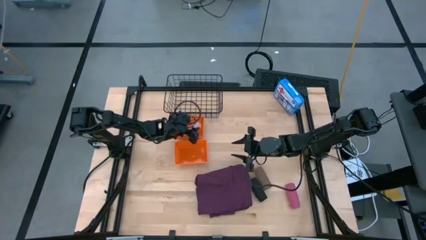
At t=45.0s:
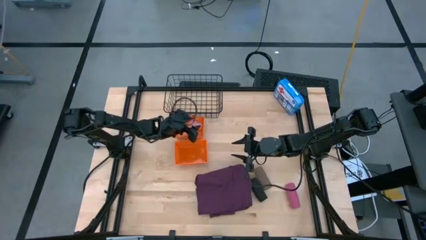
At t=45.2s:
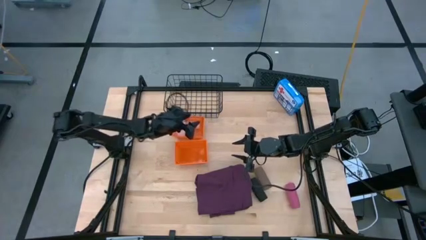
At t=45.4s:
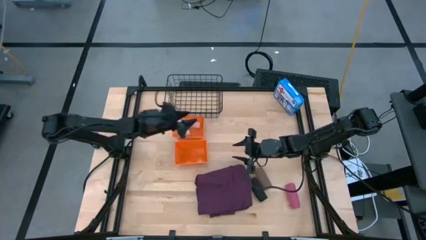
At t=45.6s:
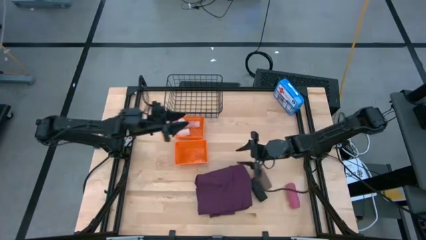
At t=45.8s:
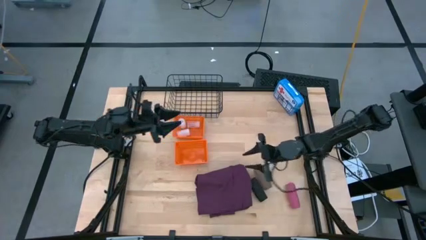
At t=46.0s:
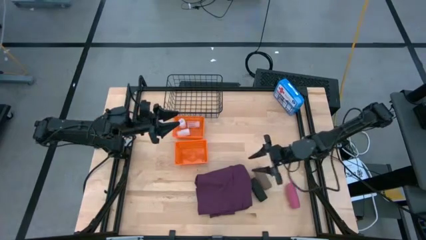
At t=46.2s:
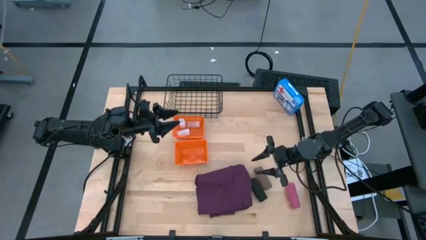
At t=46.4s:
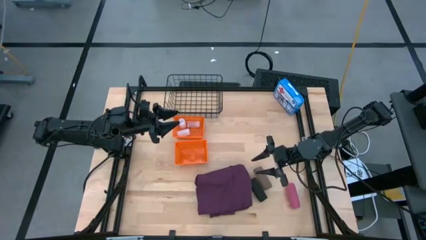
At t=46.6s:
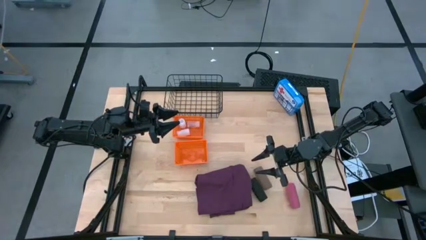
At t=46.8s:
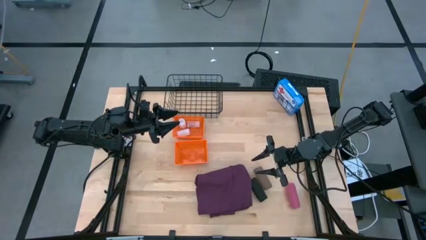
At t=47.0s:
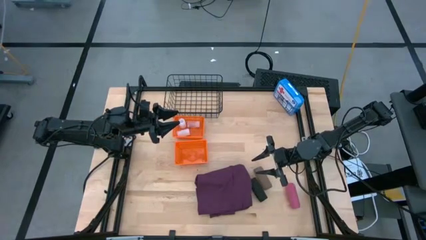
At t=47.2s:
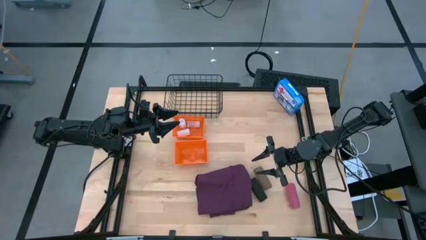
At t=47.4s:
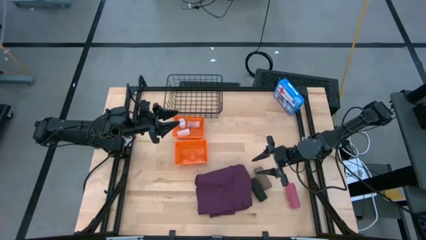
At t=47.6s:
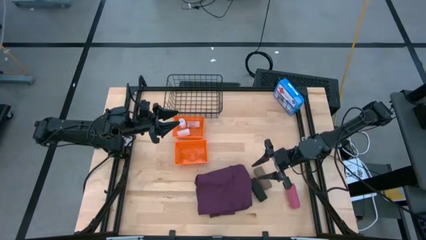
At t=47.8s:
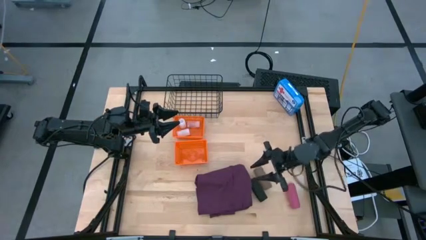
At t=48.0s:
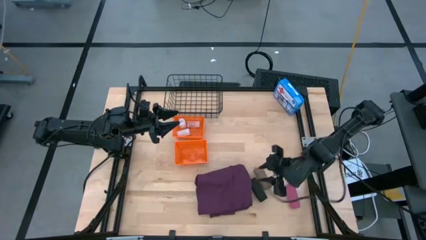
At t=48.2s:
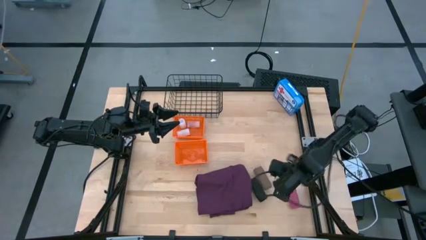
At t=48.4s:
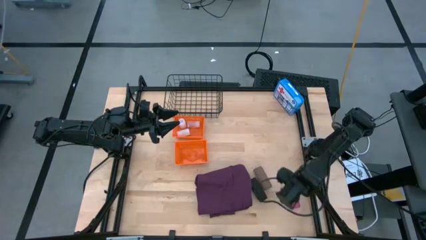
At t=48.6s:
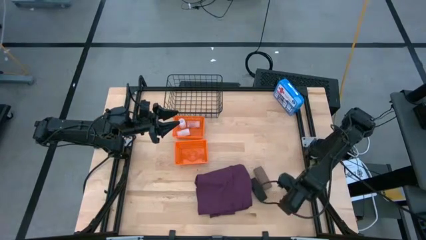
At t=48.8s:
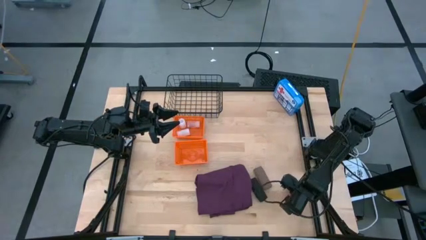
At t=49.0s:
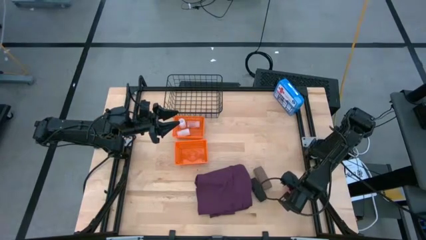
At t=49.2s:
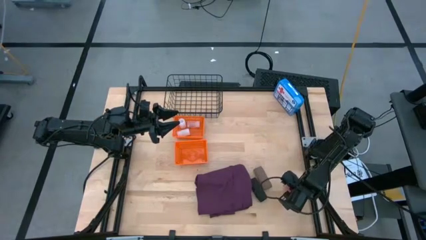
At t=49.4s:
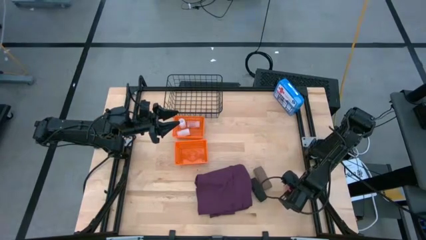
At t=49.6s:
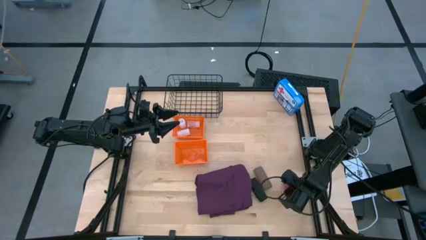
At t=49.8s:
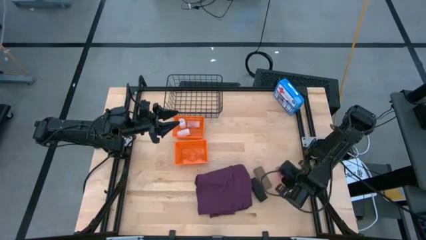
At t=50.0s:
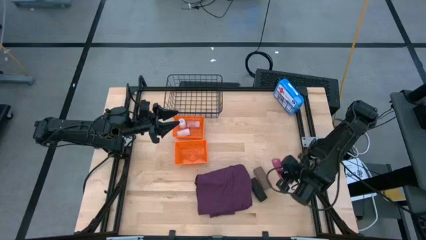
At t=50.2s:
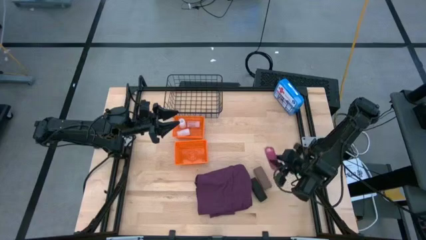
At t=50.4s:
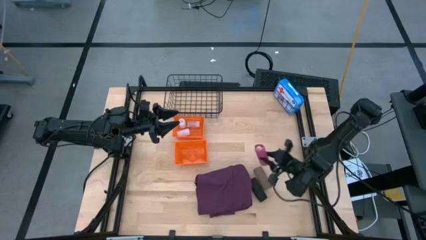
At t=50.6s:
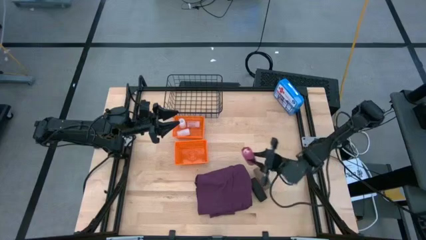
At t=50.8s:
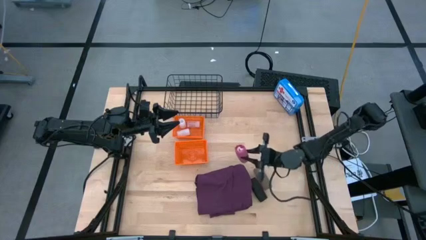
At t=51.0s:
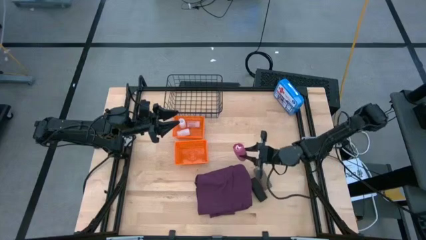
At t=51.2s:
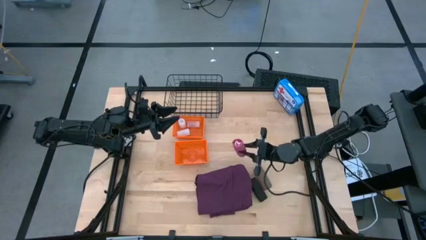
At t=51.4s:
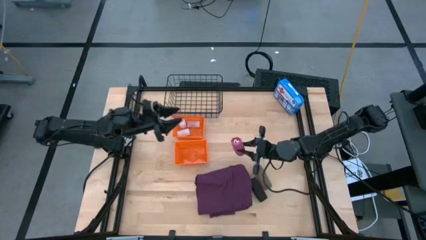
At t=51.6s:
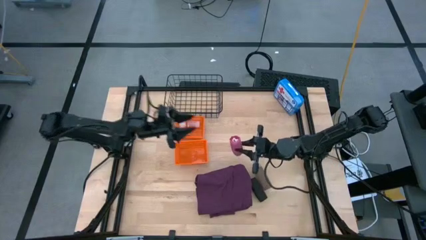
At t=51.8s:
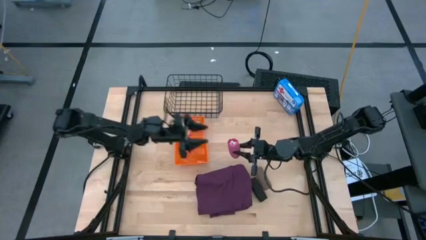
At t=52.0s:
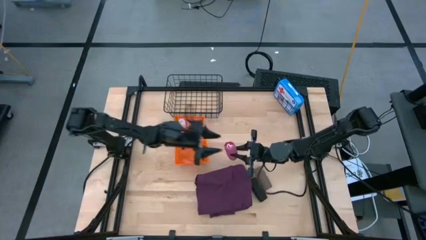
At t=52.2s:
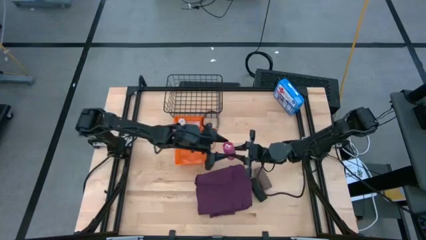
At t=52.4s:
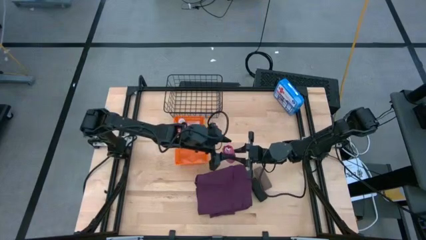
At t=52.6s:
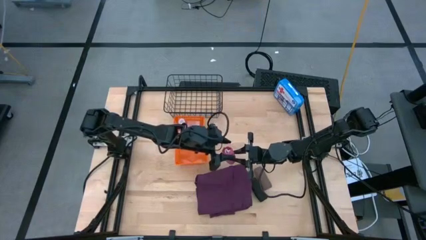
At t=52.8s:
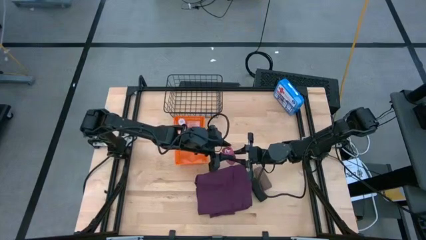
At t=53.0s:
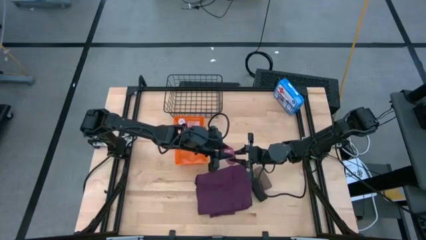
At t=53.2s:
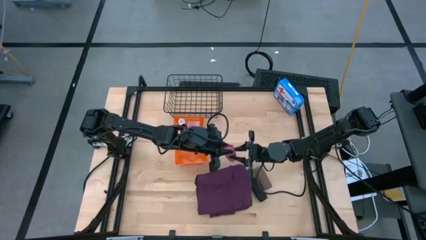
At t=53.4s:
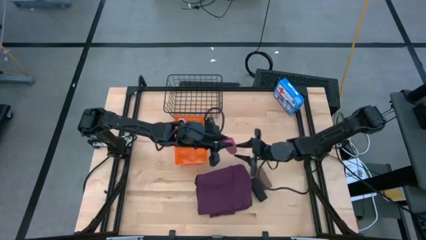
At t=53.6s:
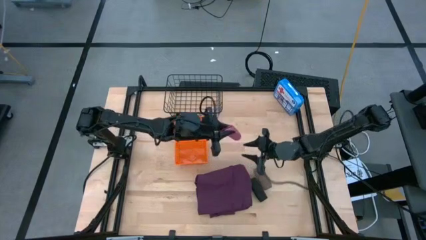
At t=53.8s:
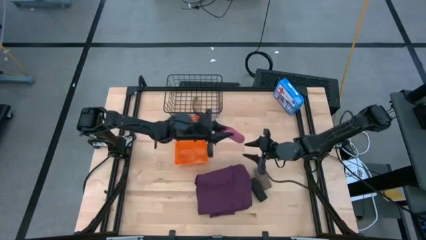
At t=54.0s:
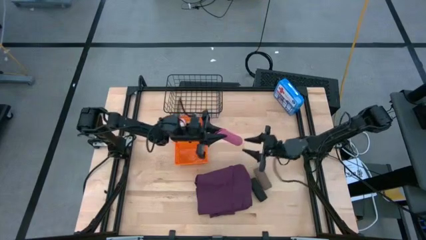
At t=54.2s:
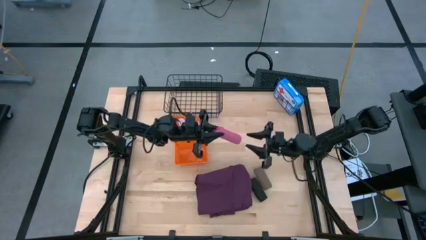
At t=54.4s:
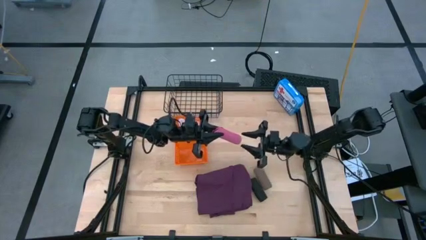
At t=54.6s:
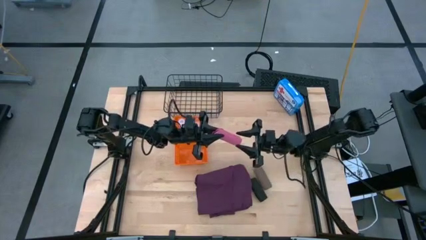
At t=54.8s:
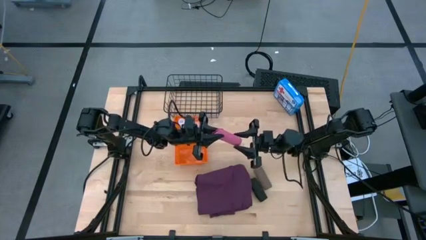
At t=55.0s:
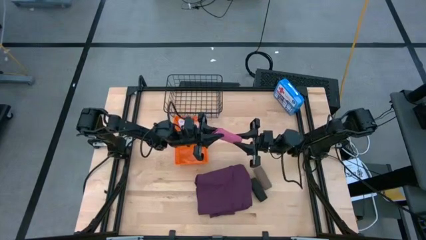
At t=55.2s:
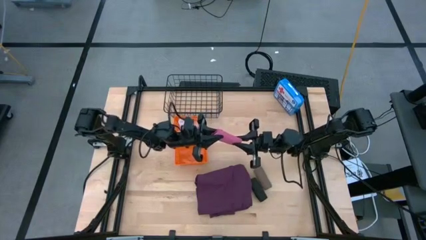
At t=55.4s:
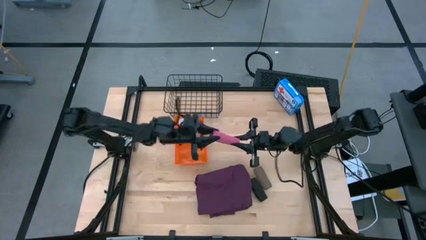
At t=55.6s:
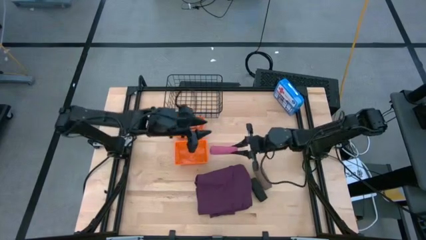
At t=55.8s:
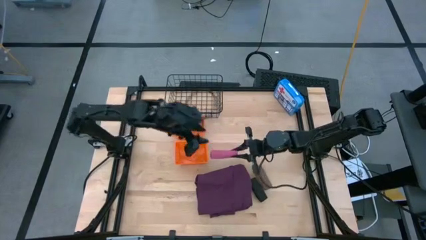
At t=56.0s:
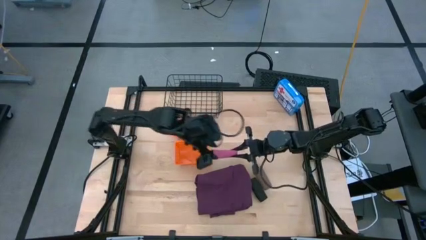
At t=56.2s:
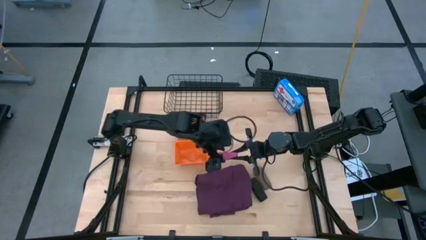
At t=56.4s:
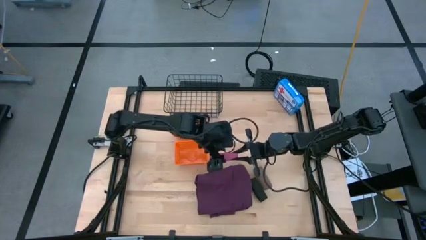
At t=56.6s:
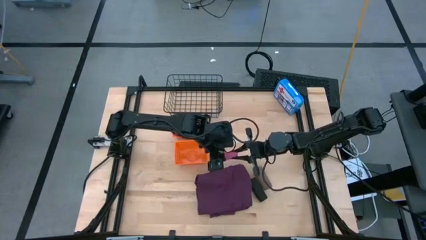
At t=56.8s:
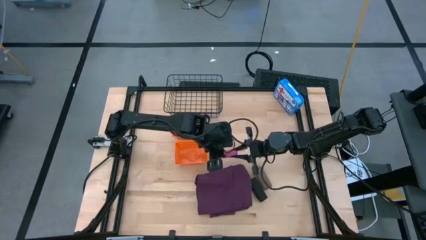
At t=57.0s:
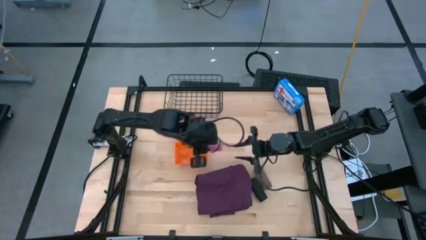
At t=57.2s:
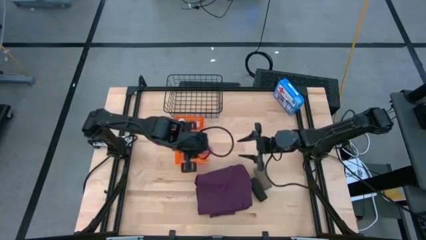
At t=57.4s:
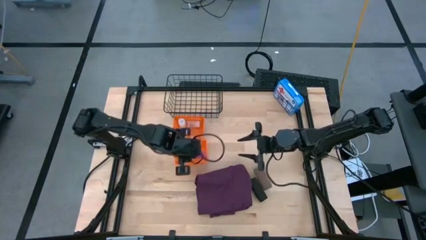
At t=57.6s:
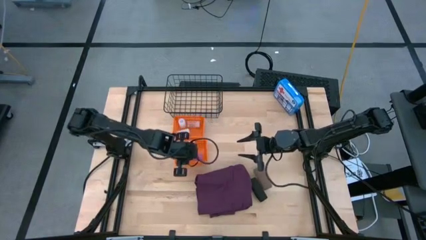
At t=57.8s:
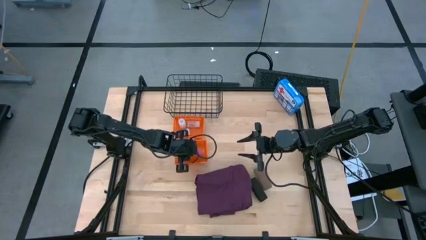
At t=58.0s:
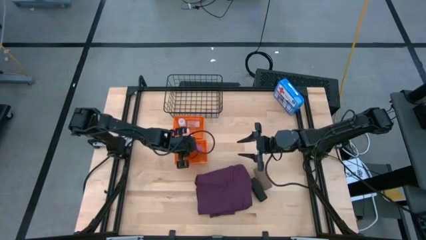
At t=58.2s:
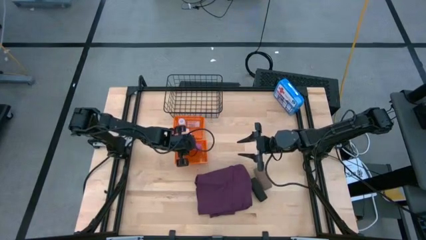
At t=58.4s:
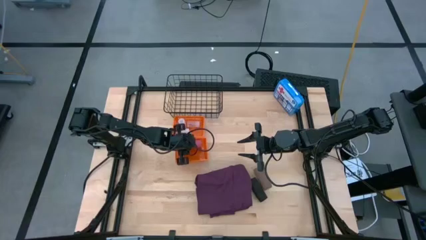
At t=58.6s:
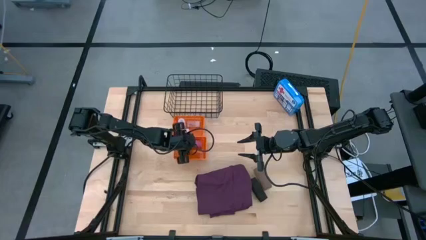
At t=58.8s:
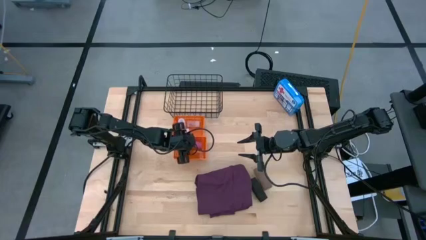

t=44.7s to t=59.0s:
Task: Pick & place medical supplies in basket/bin
Put the pink bandage into the bottom orange bin
